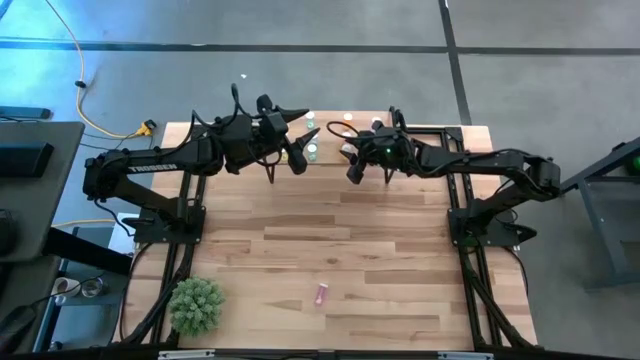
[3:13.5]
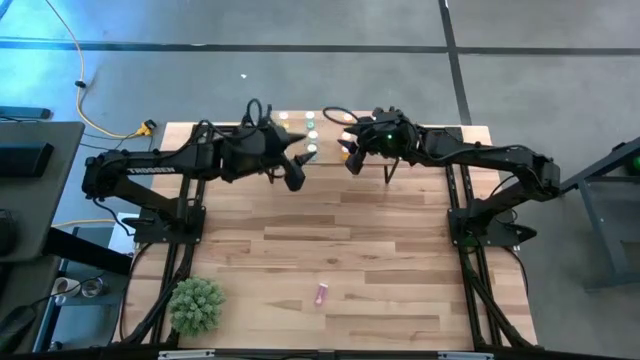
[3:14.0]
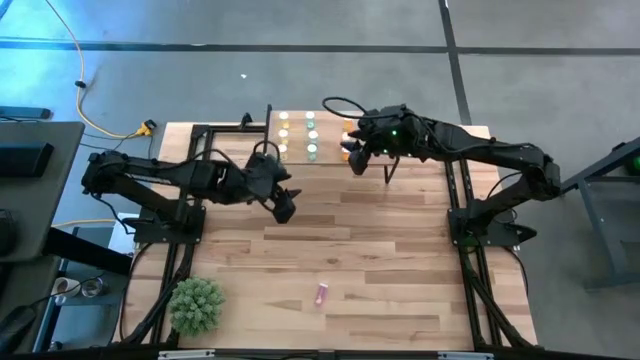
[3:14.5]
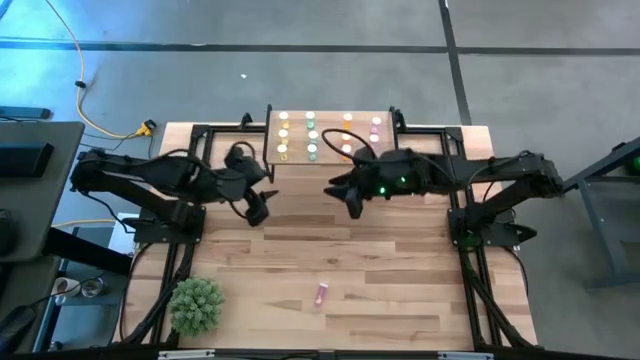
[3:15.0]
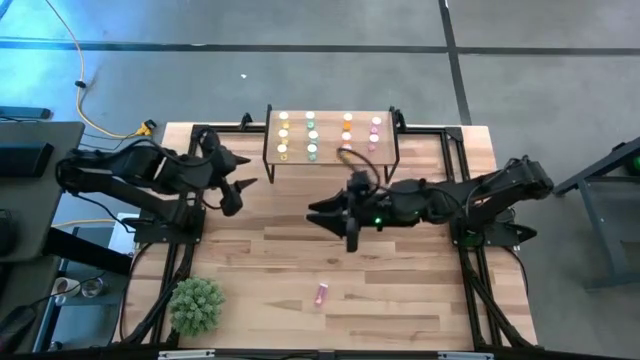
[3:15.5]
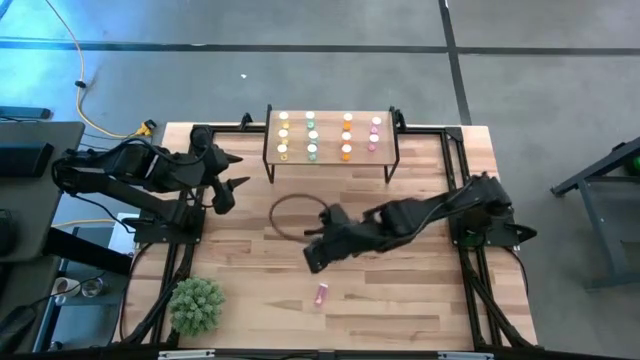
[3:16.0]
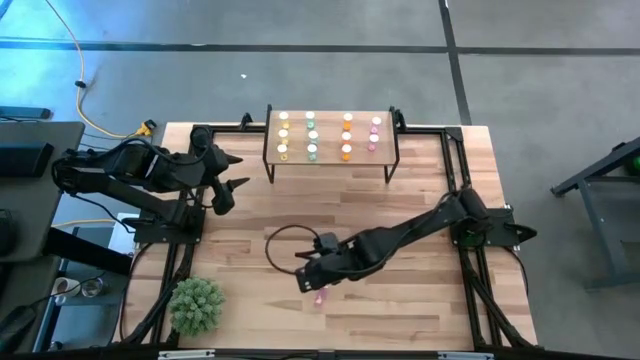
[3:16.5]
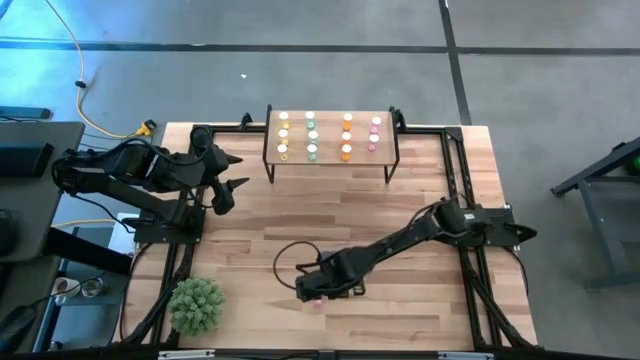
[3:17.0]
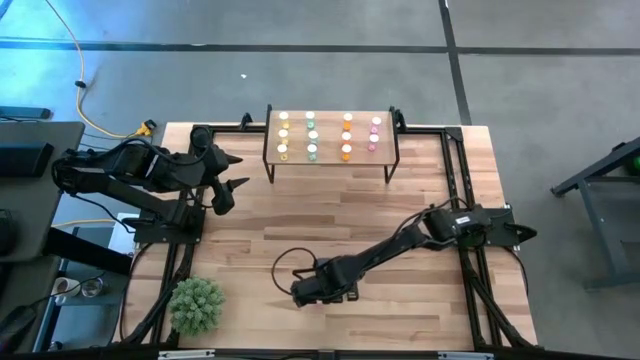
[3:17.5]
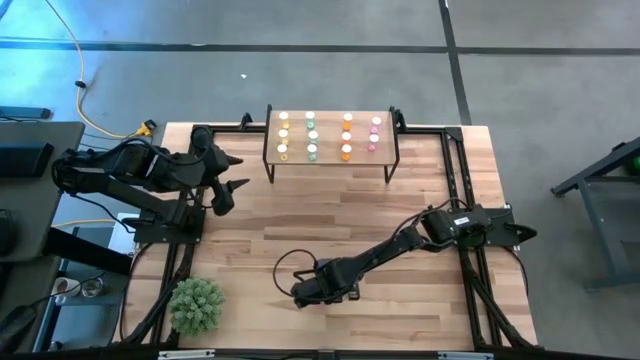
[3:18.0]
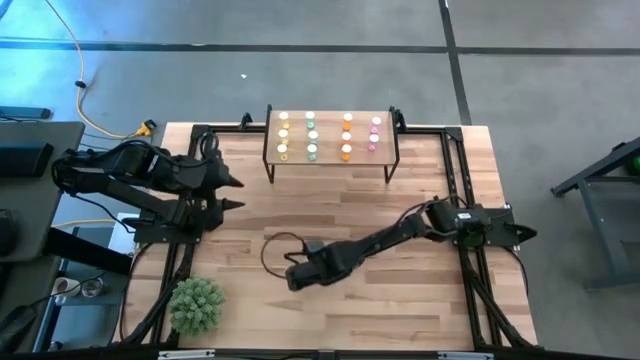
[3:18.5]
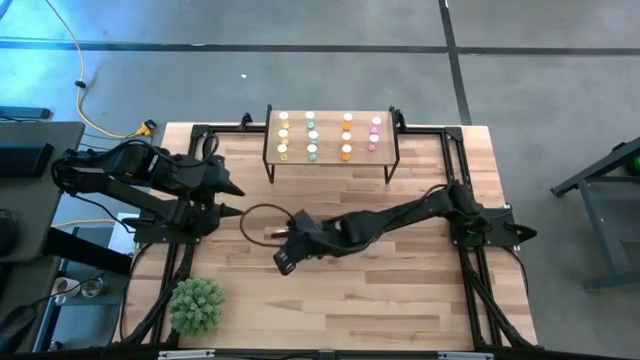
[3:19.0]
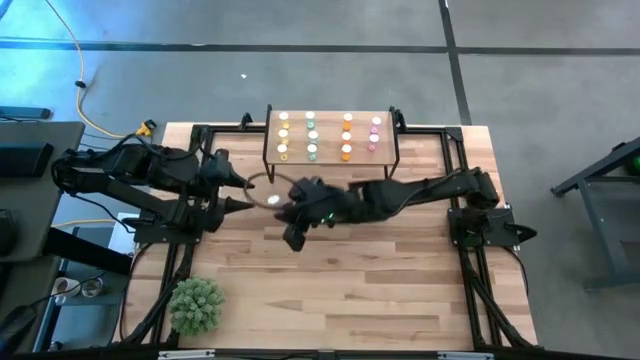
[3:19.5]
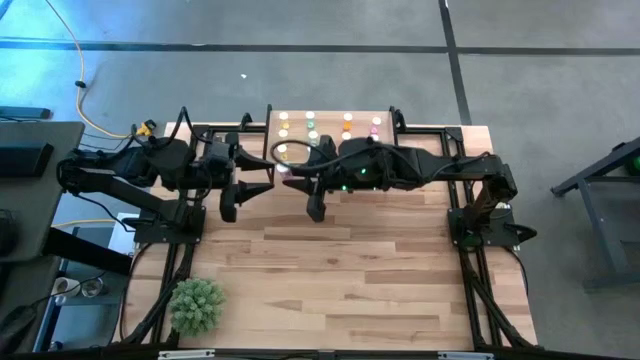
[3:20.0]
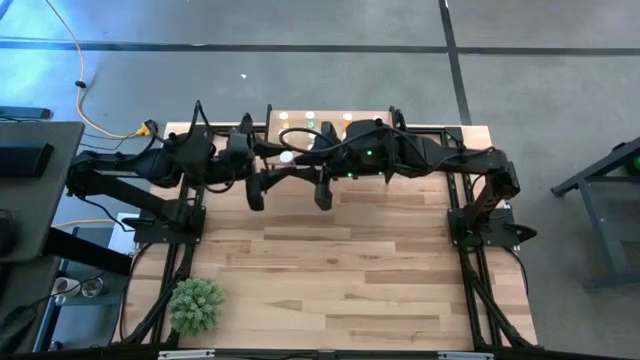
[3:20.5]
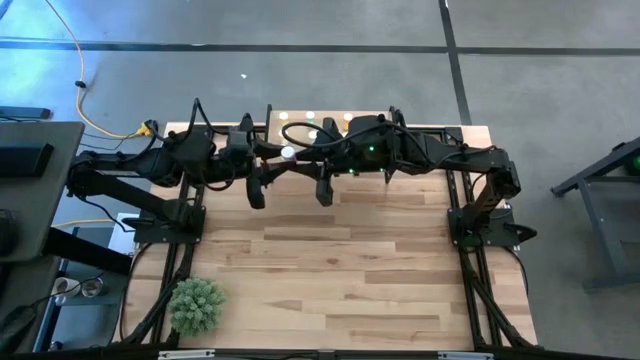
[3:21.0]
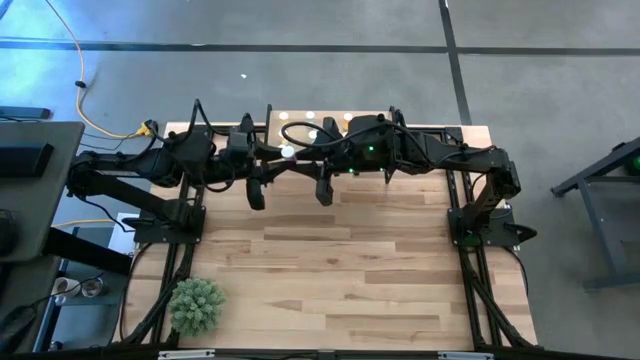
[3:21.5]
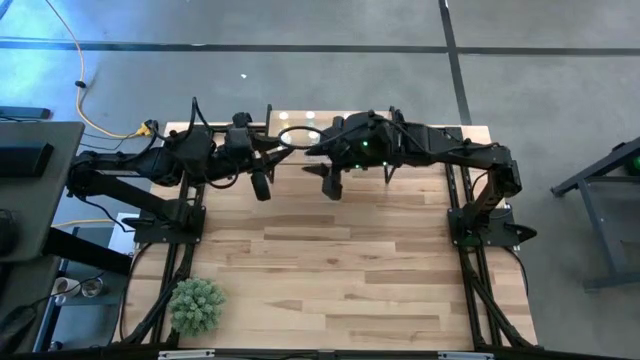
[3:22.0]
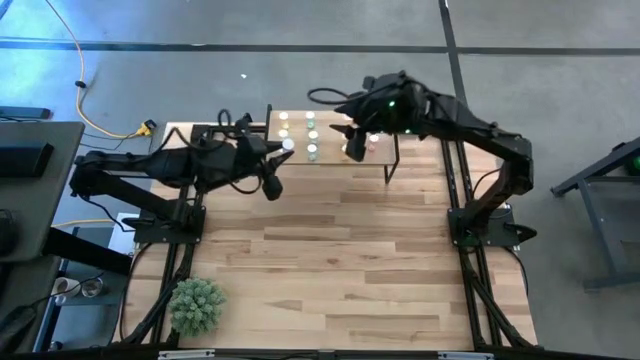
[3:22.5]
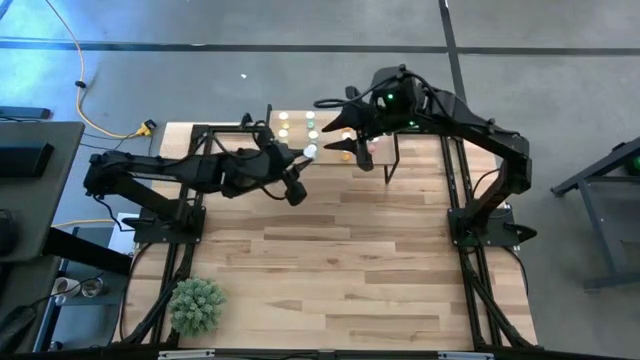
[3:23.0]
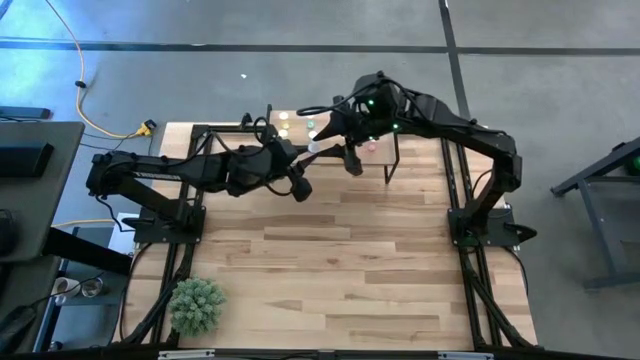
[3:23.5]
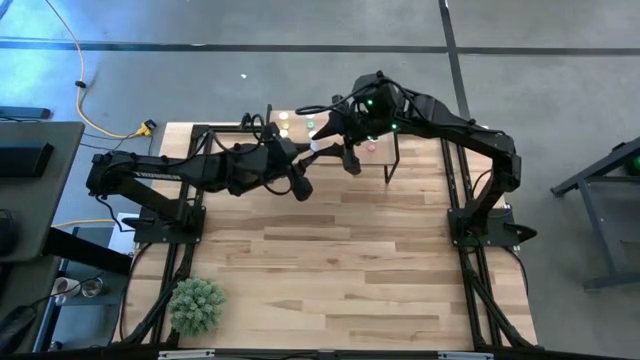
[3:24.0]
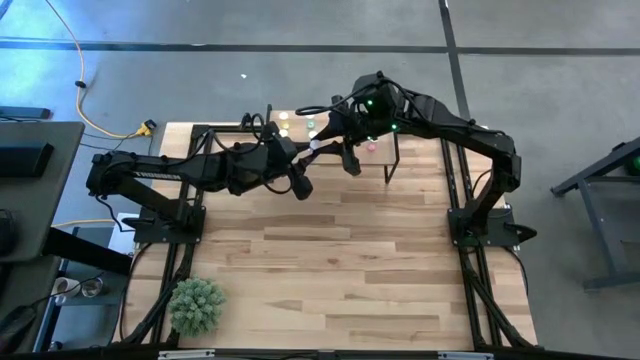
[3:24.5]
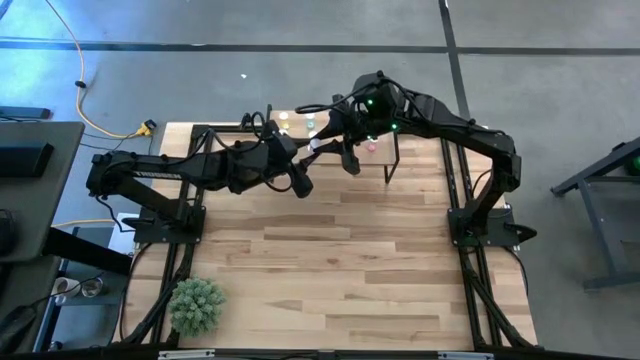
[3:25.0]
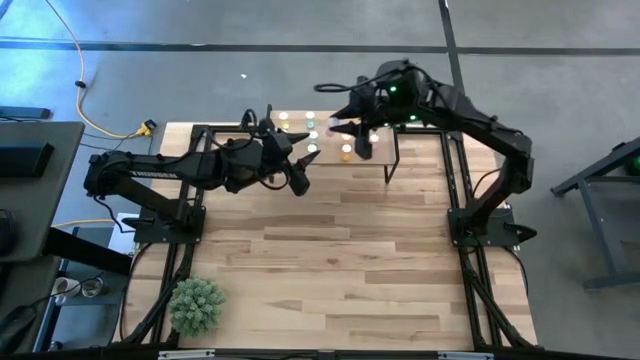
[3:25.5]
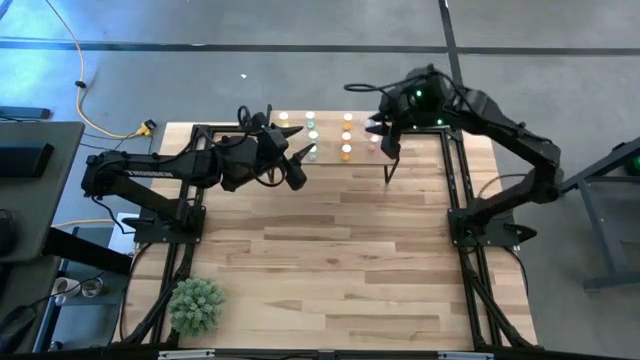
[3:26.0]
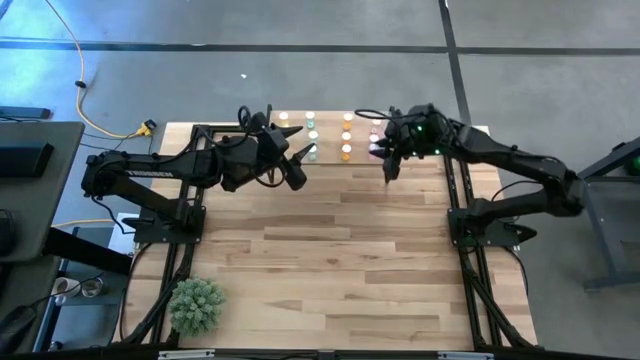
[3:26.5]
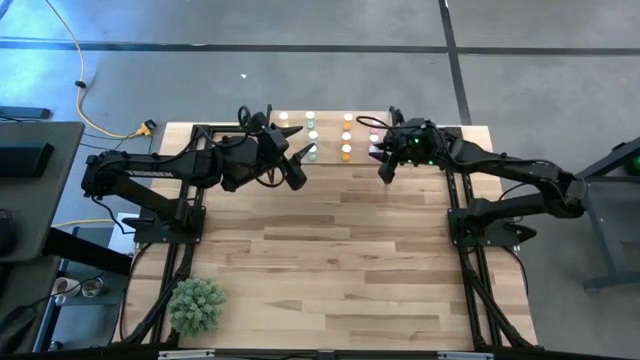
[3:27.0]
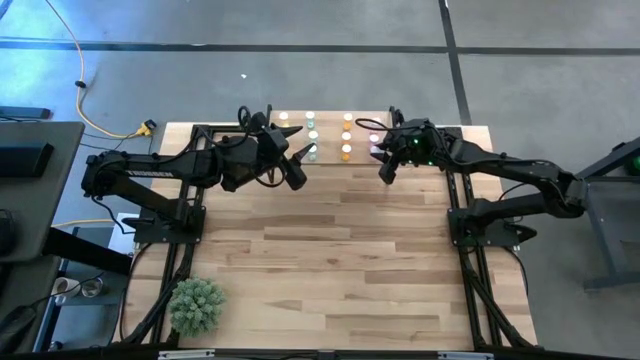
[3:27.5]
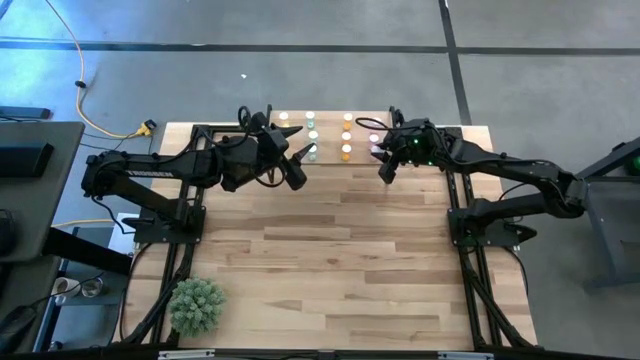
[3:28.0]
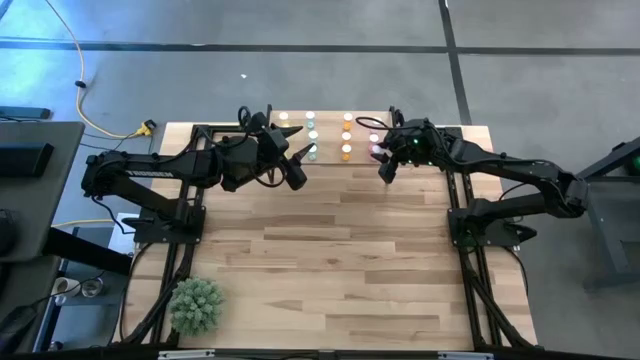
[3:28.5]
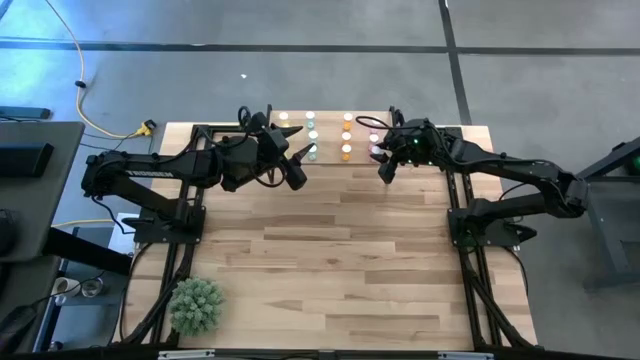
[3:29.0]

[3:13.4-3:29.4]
Task: Pick and place medicine bottles onto shelf by color
Put the pink pill bottle on the shelf aligned with the other pink pill bottles

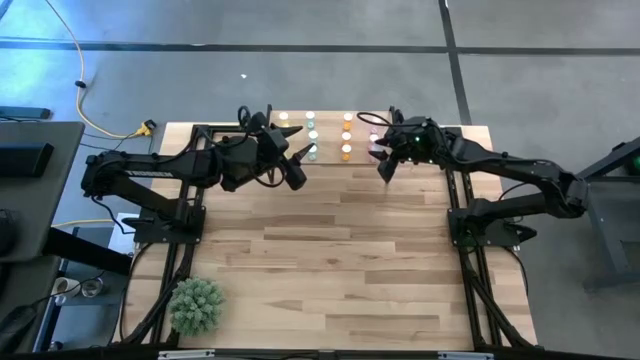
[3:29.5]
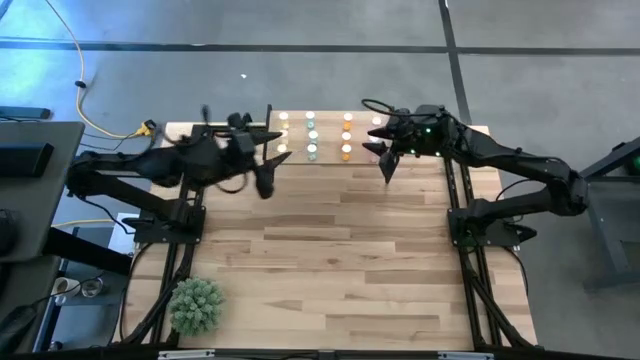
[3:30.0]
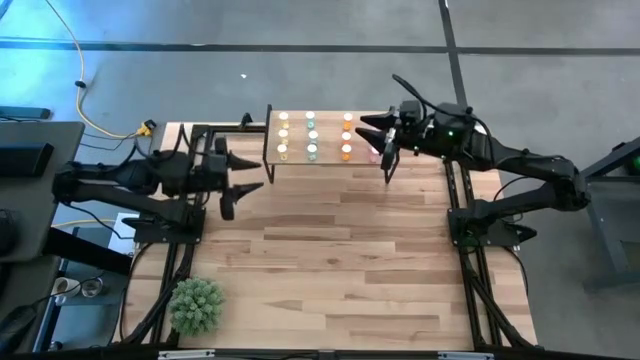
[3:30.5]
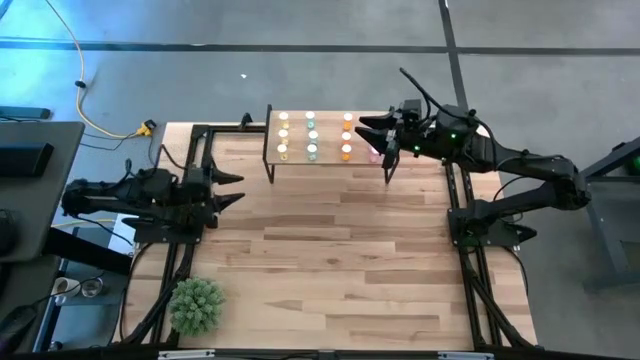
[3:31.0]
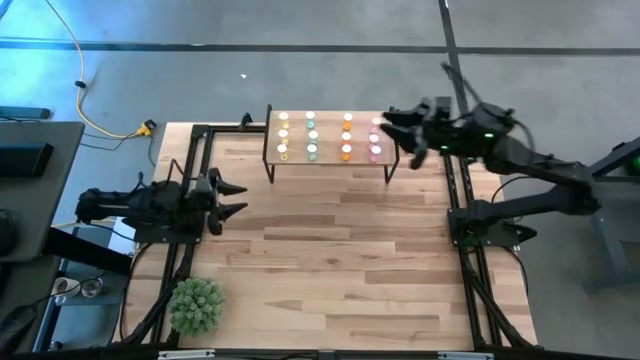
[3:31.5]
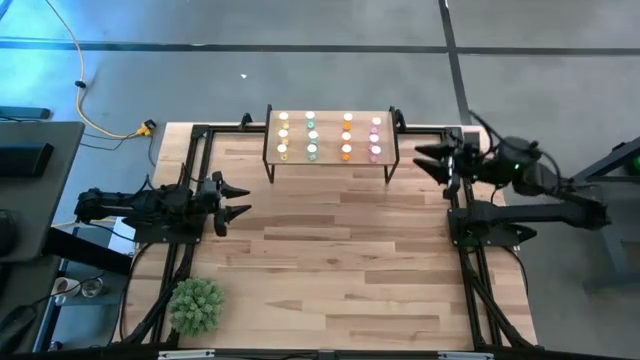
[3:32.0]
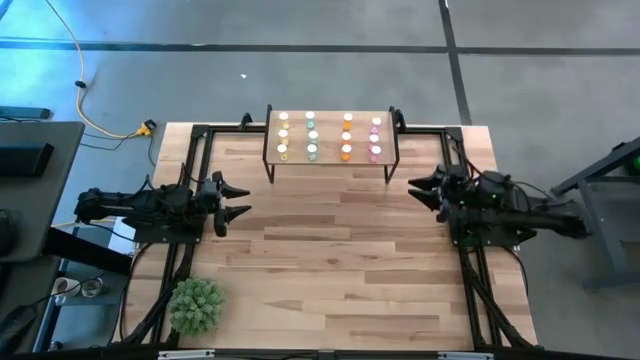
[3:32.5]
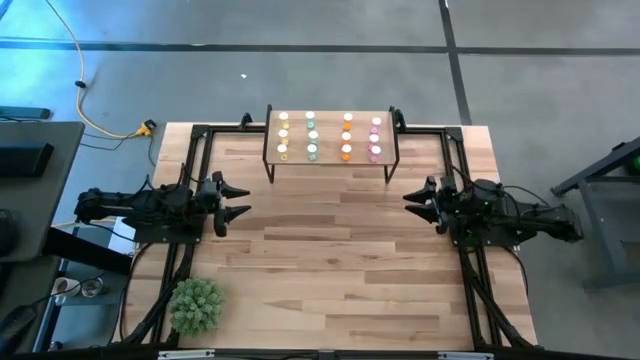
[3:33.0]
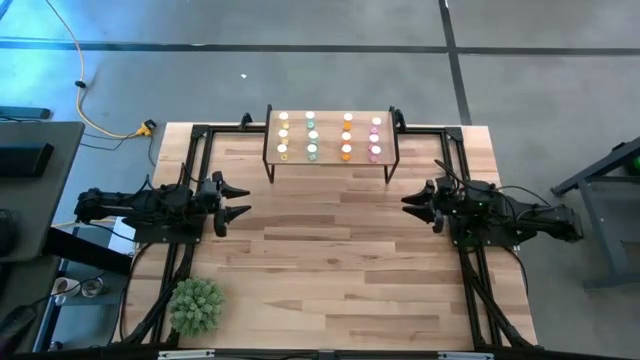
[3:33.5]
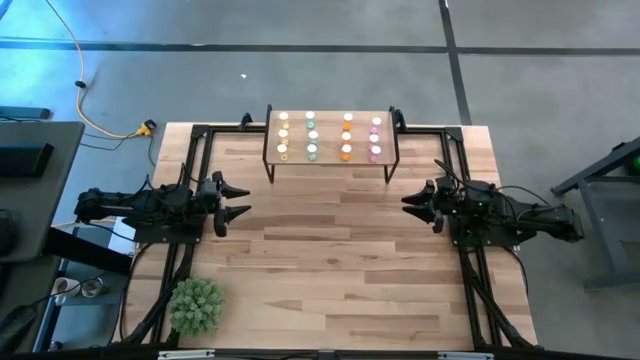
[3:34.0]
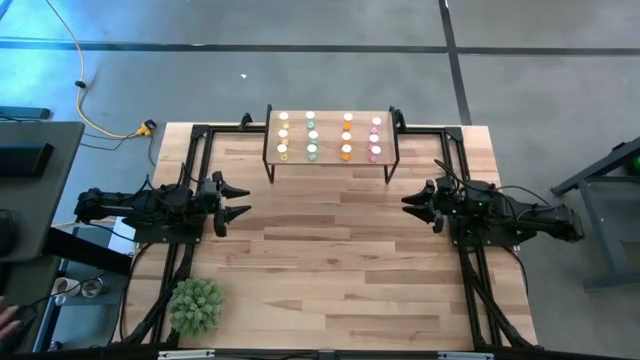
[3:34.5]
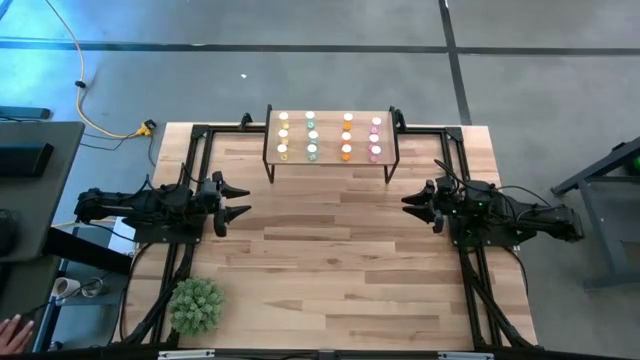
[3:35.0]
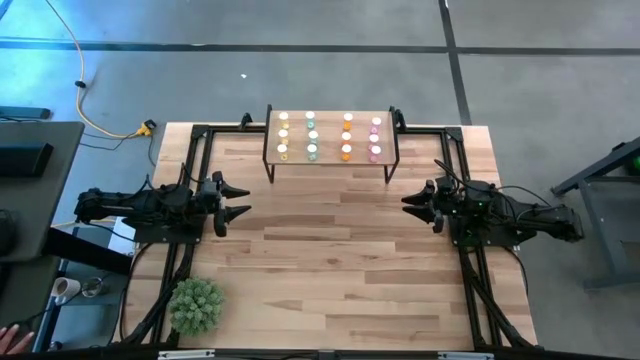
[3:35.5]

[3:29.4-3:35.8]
Return to Home Position
